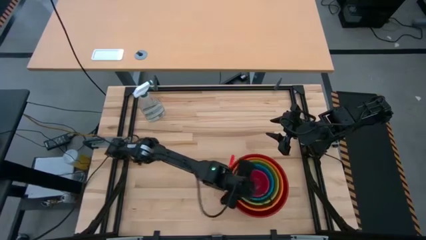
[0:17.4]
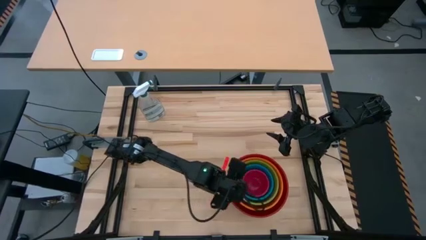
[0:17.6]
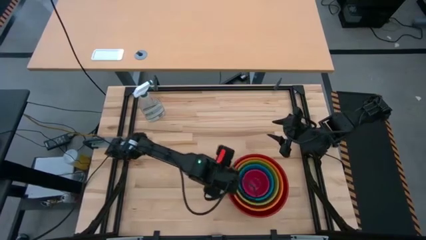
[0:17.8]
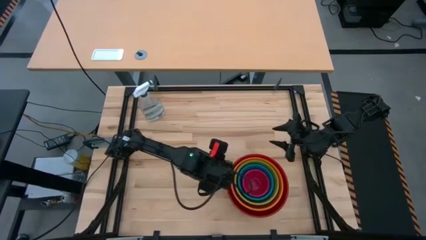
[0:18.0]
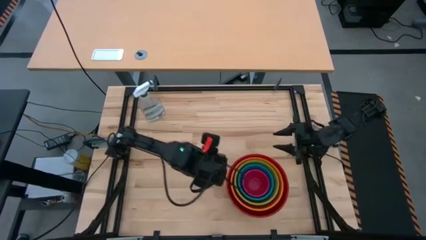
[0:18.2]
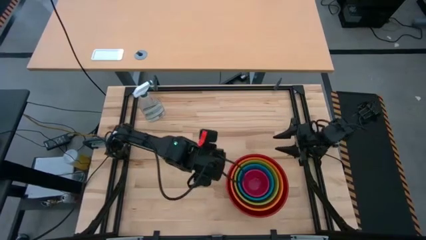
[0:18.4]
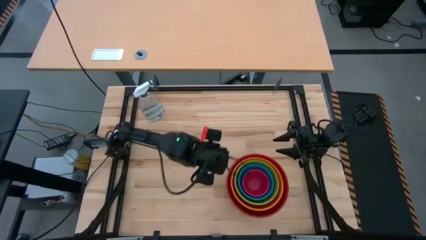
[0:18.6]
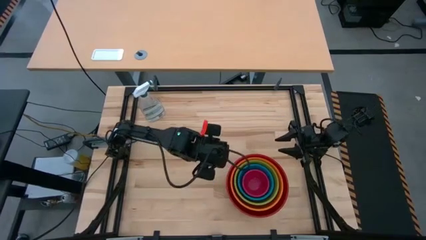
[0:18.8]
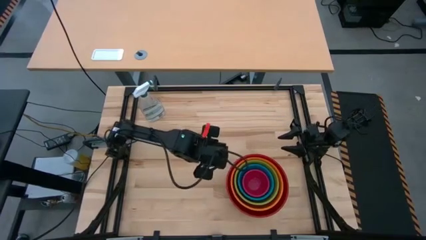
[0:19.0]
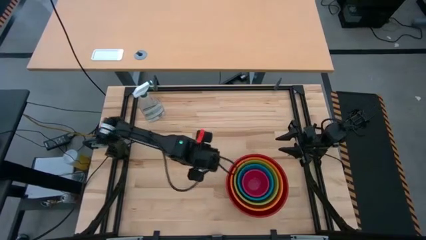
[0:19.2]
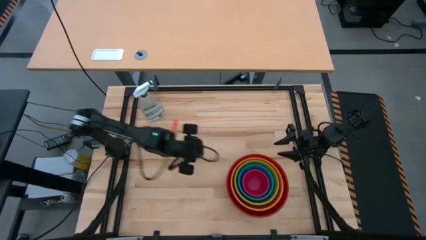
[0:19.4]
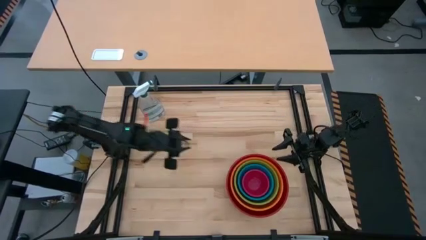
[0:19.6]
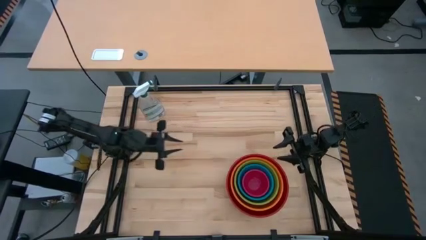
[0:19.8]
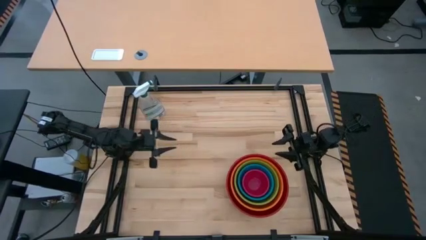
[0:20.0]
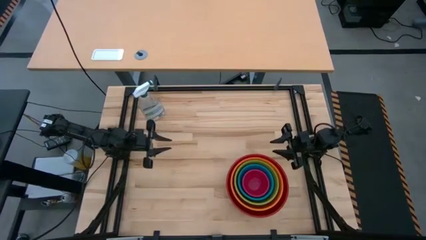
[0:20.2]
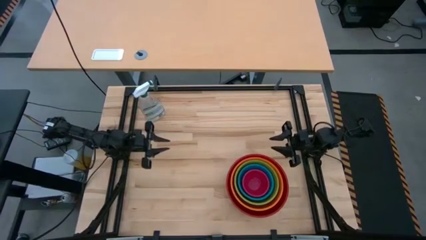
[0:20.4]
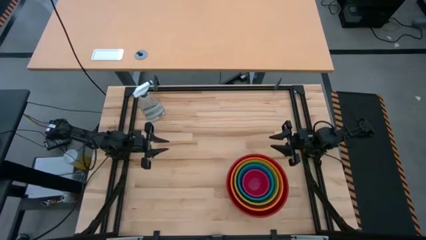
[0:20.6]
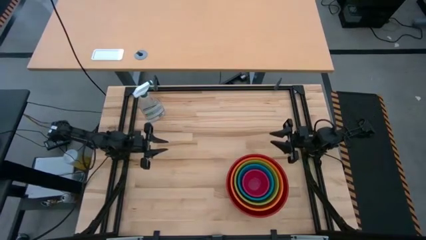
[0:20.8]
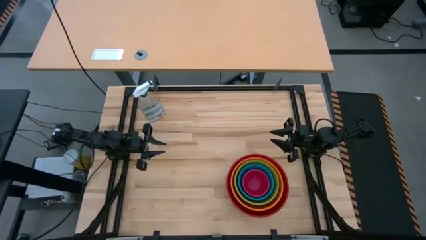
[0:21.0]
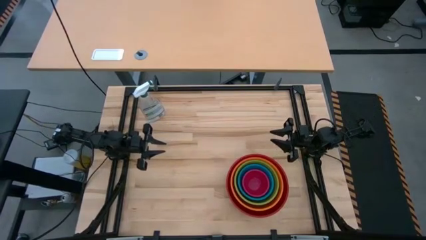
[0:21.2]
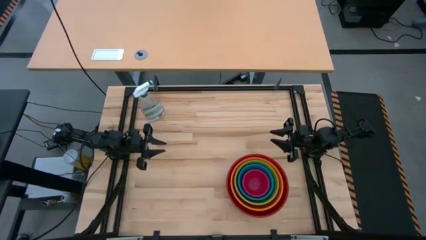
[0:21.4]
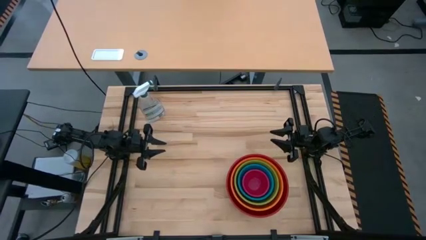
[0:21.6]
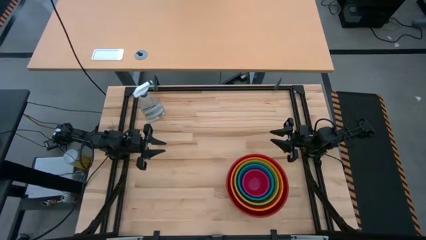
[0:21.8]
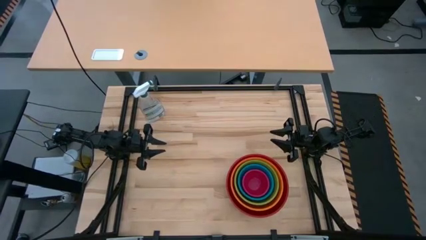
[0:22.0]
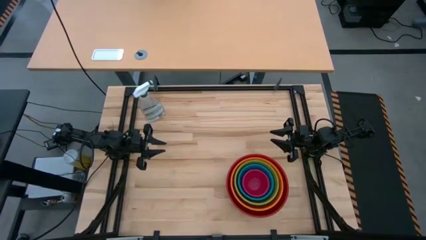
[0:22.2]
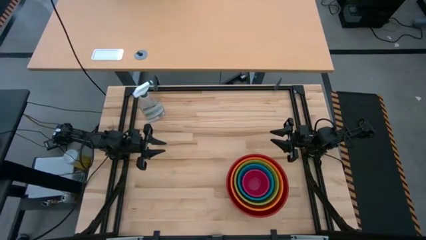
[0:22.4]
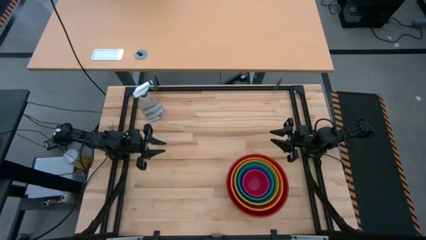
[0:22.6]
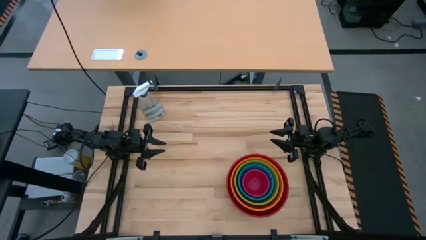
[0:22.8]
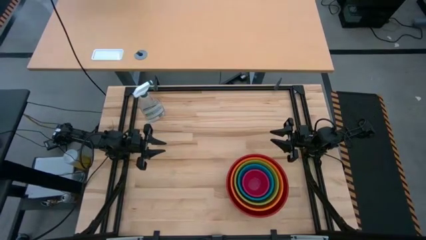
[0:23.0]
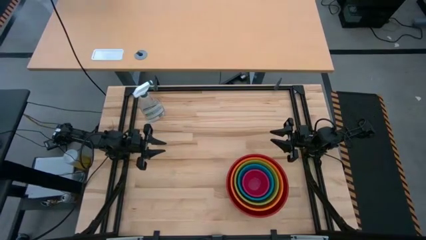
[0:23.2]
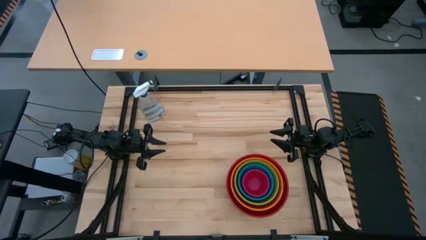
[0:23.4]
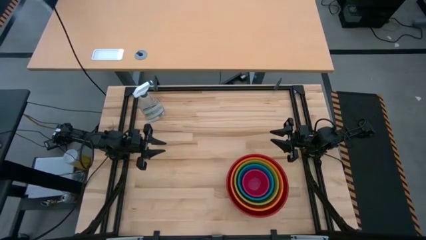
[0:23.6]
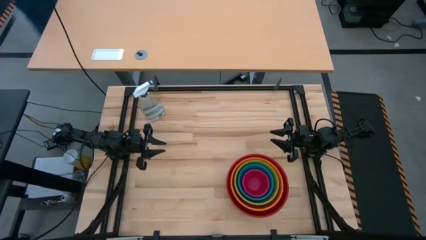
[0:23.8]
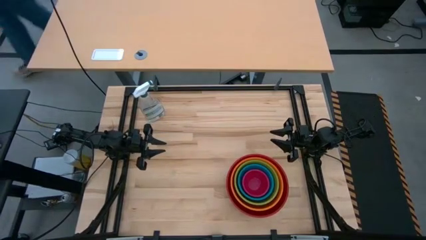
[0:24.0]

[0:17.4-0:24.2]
Return to Home Position

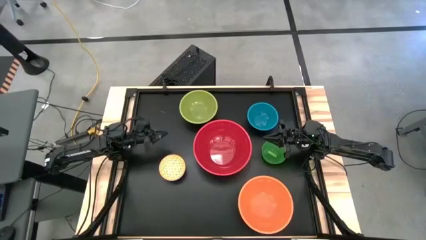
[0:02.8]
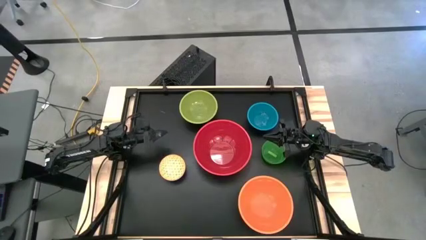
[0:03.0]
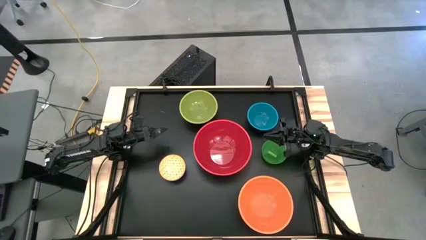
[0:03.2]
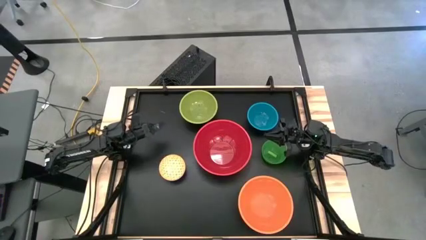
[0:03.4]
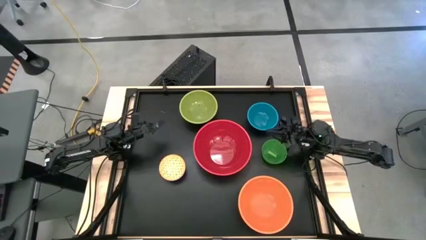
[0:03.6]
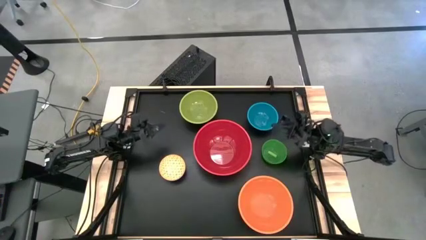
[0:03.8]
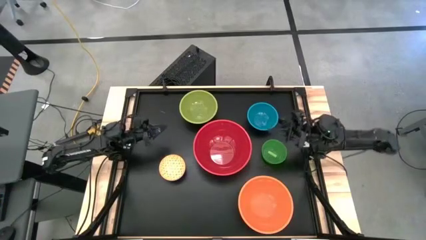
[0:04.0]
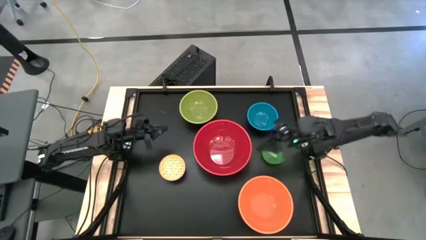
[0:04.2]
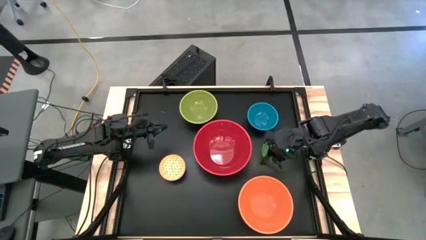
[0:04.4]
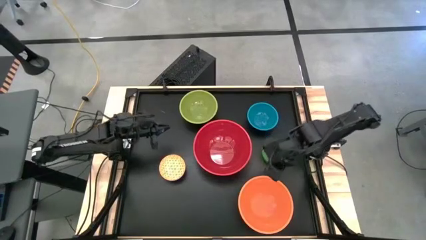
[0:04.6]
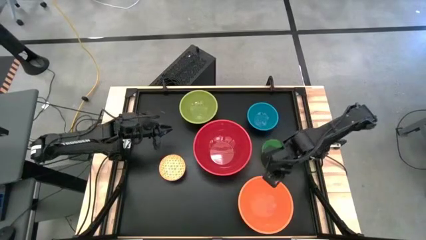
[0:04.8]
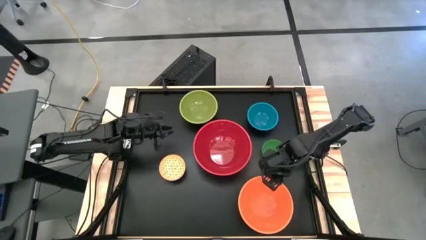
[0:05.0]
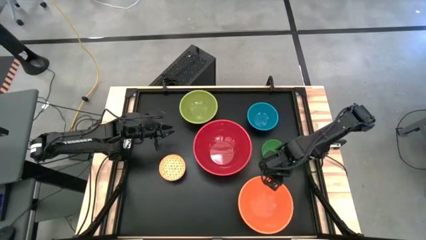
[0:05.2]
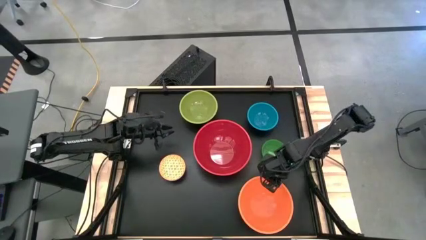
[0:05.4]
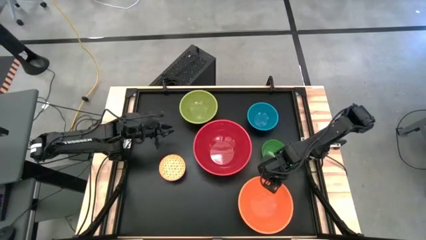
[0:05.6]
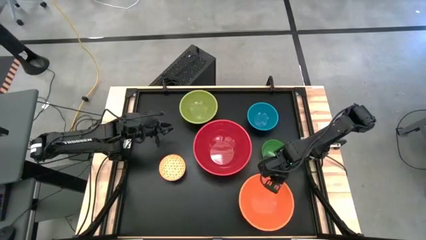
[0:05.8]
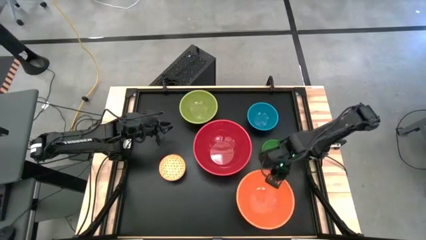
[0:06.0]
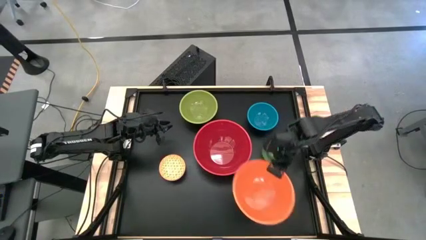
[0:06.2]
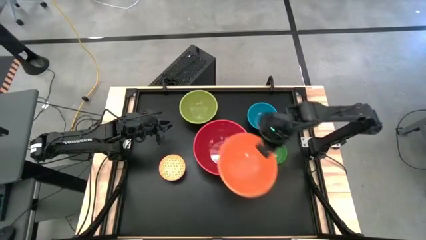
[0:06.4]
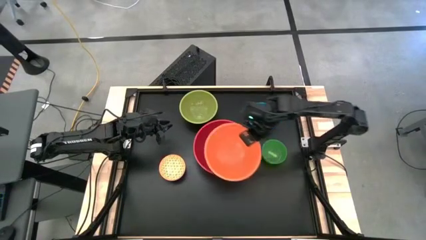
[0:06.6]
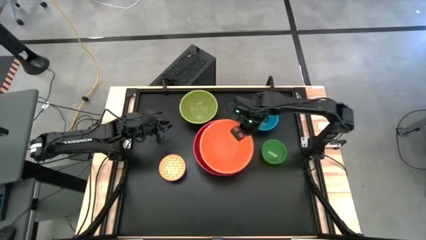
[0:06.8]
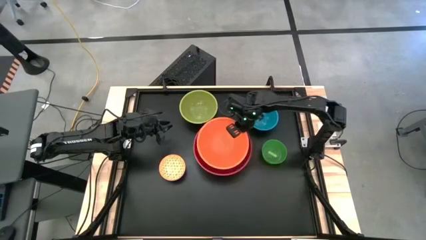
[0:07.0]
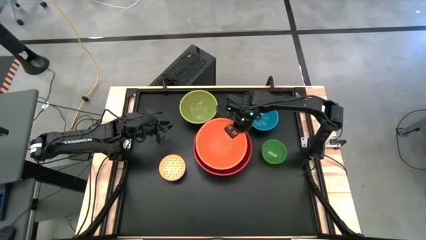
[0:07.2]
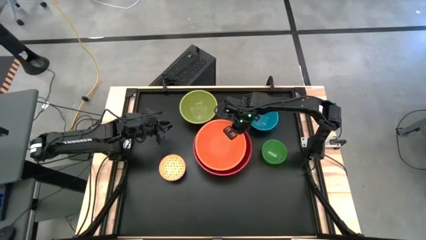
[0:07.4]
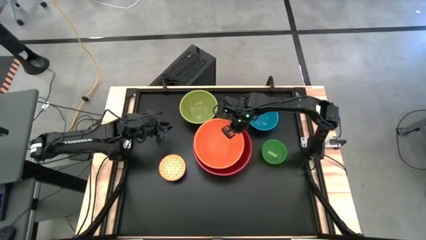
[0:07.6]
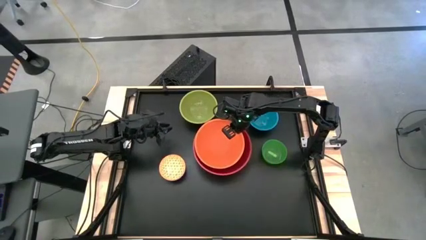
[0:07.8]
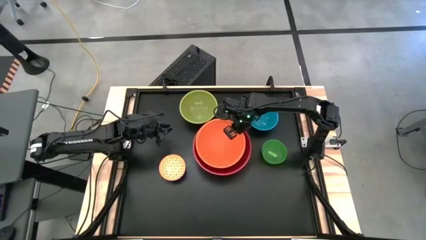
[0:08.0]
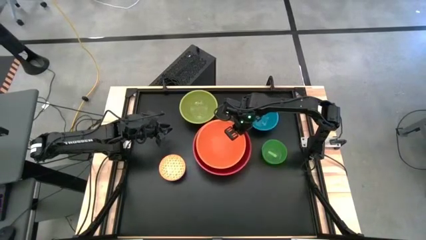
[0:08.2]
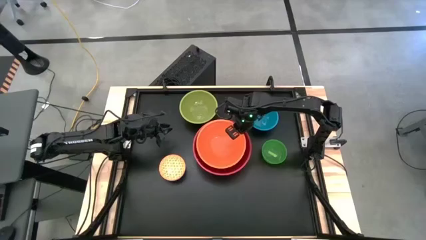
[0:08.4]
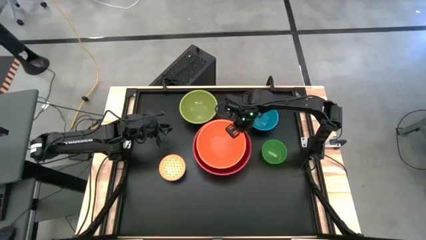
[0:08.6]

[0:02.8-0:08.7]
Stack the orange bowl on top of the red bowl
